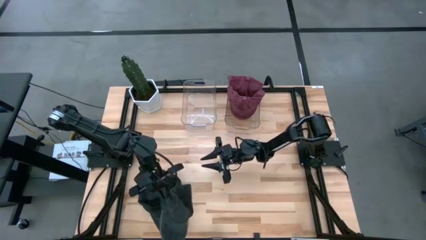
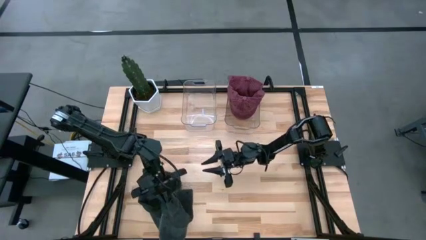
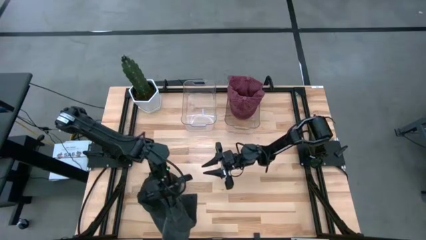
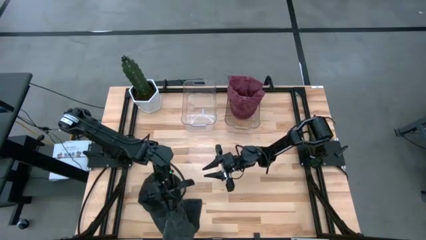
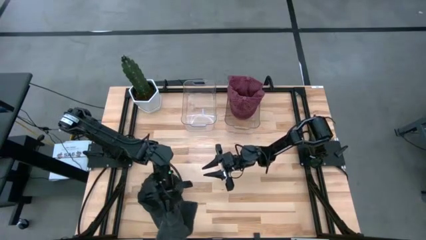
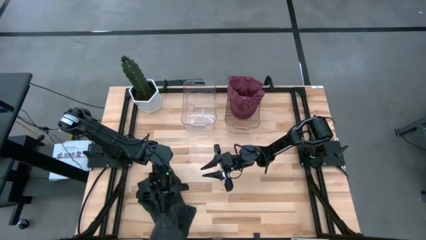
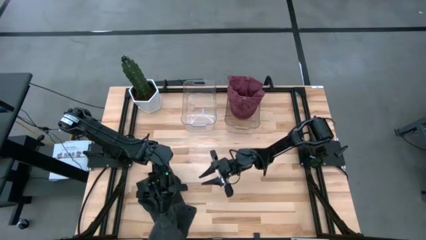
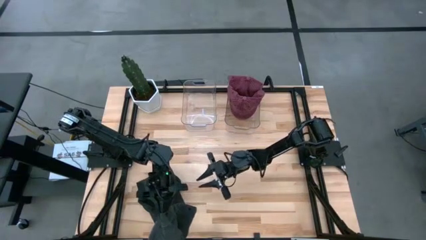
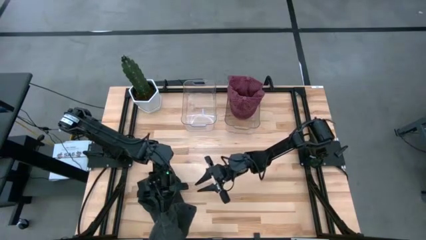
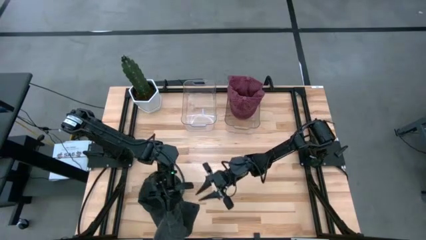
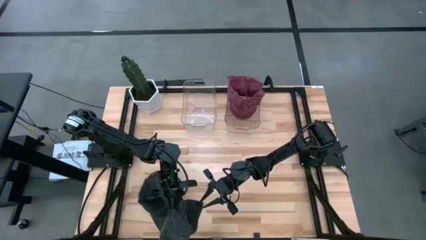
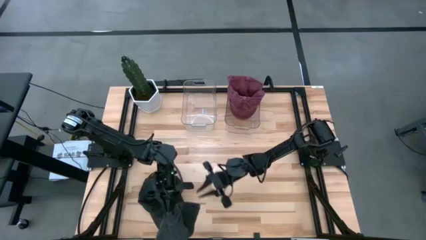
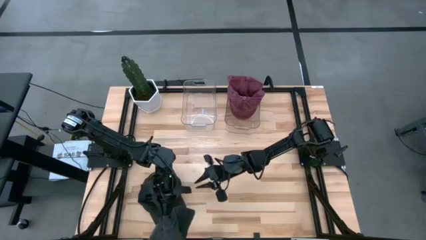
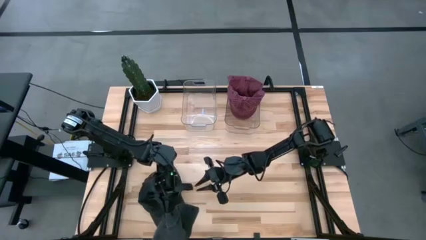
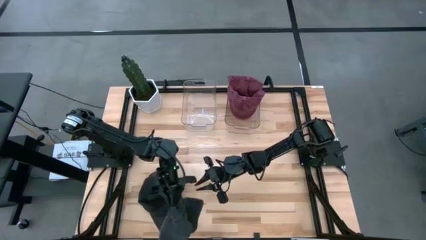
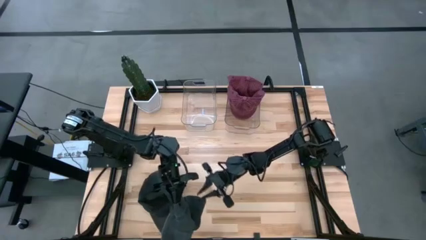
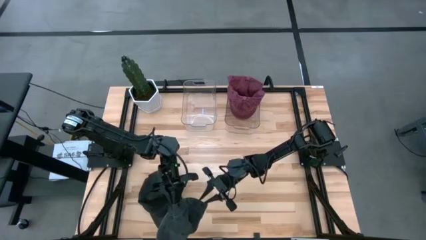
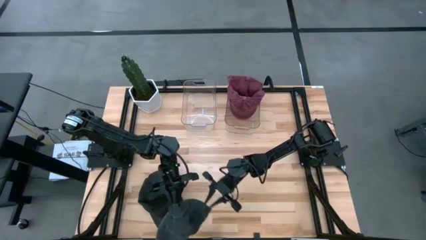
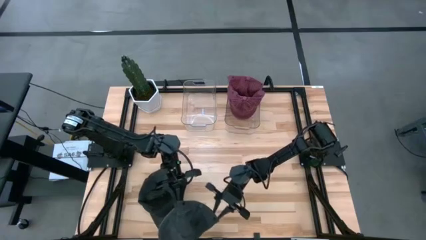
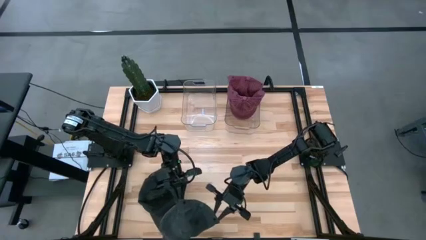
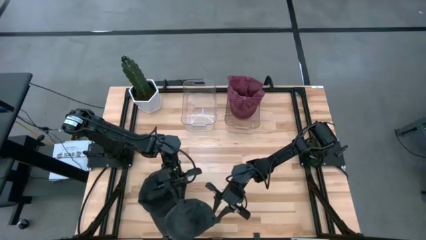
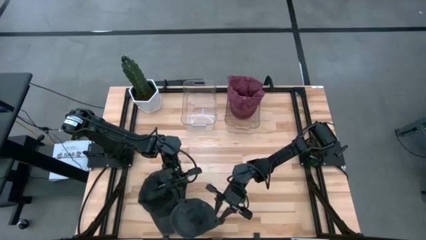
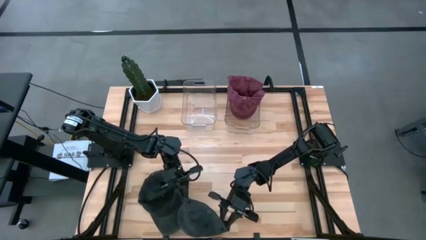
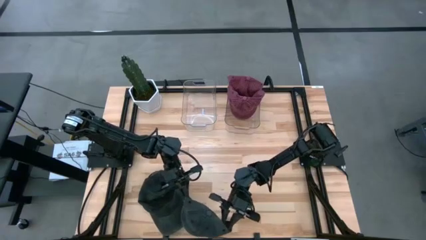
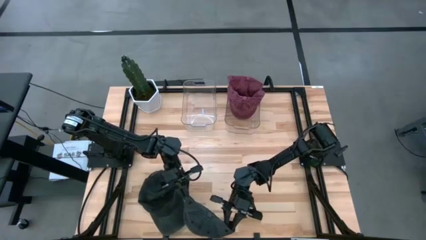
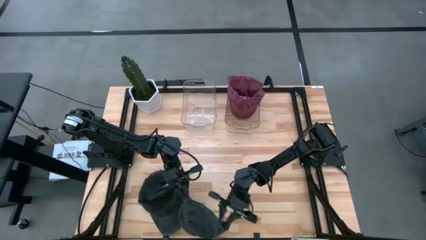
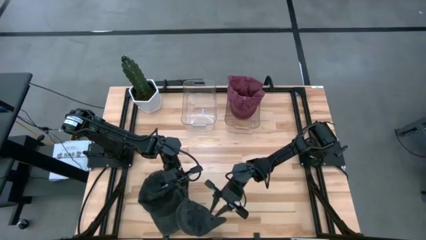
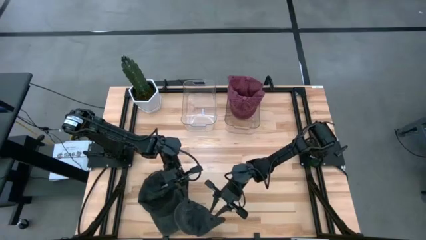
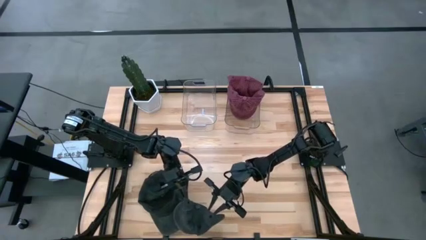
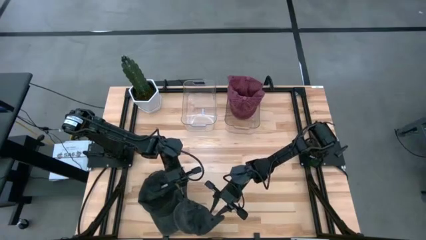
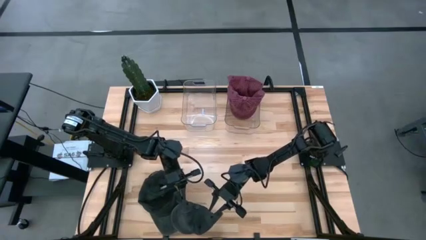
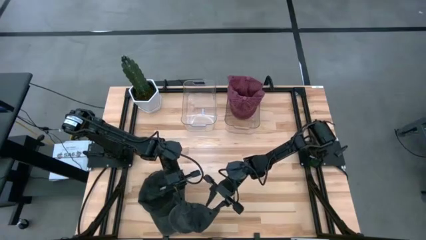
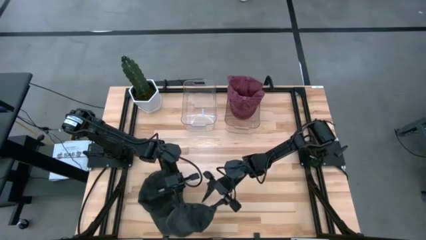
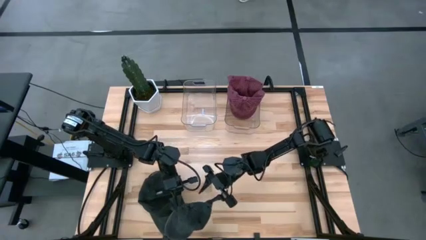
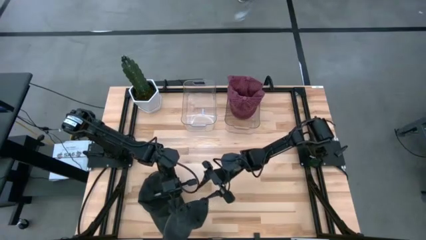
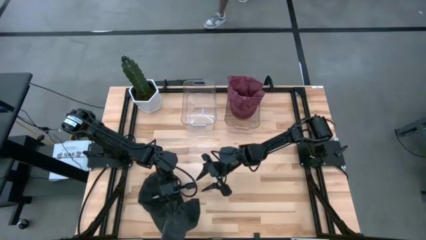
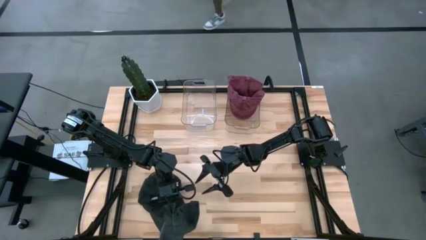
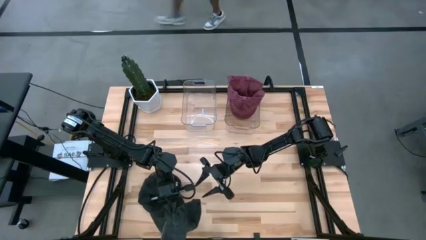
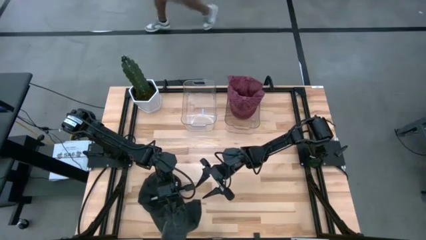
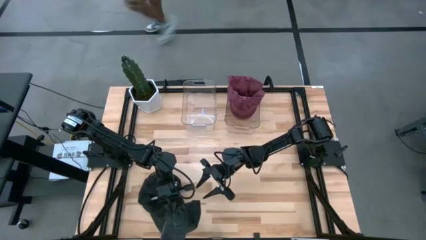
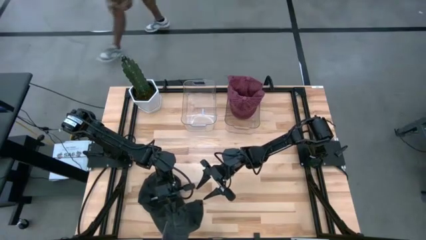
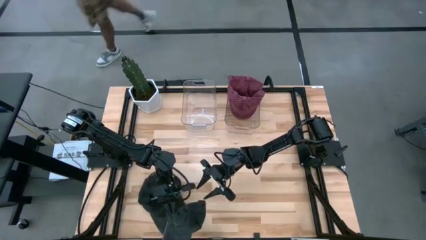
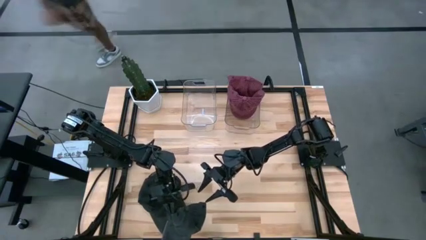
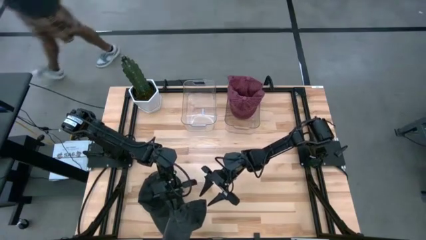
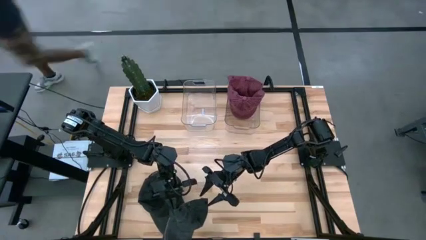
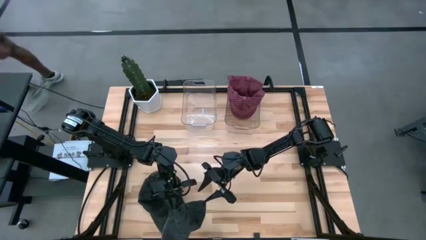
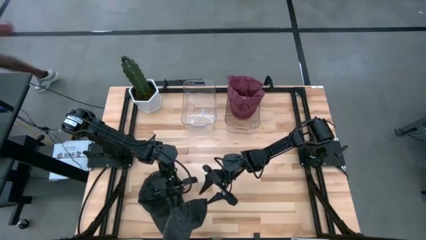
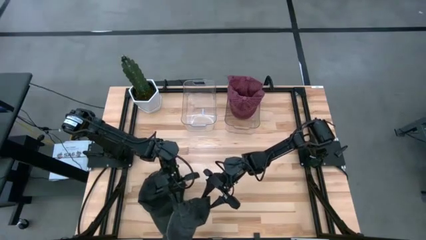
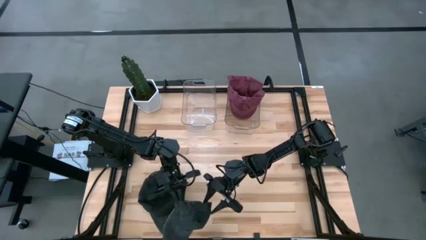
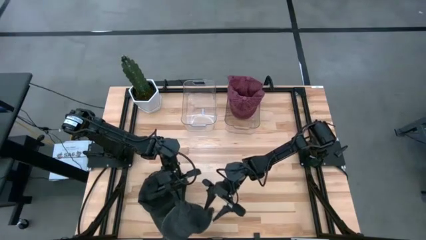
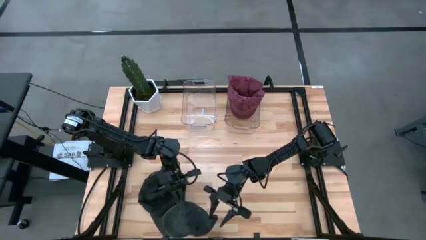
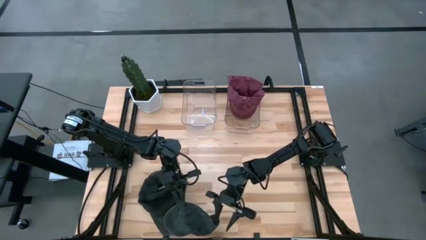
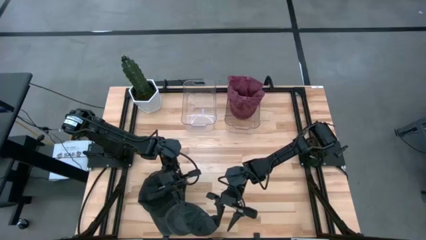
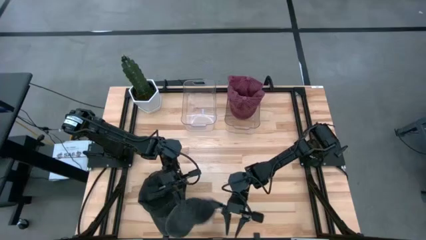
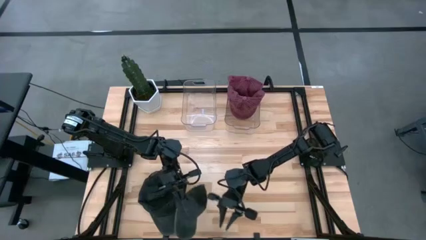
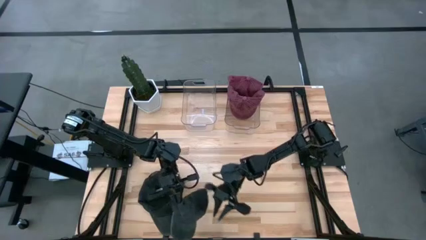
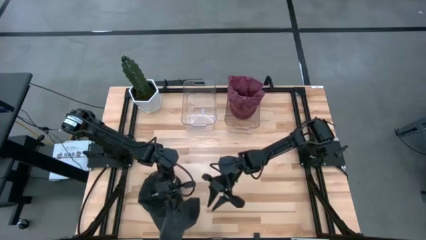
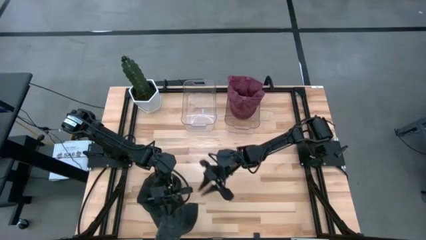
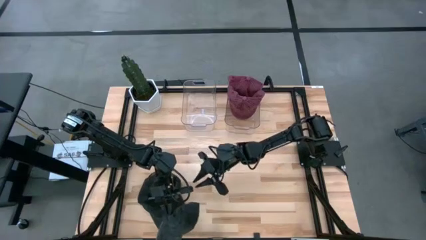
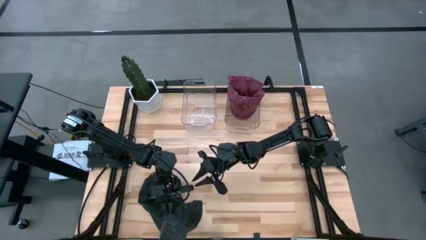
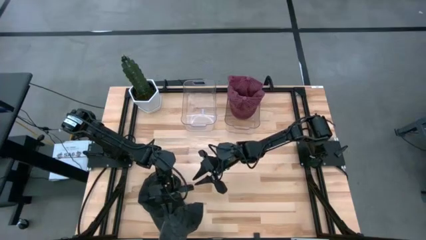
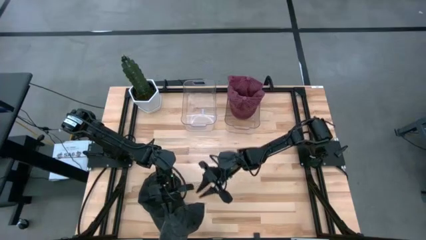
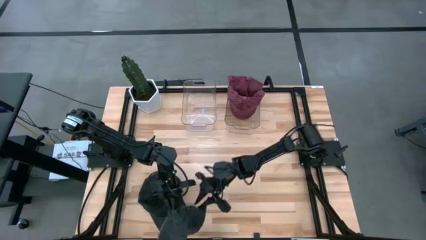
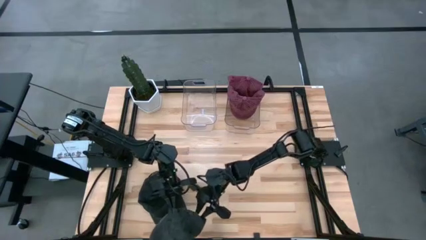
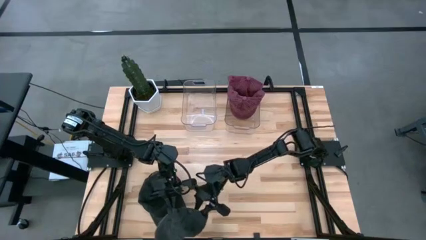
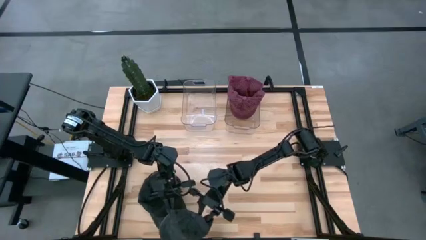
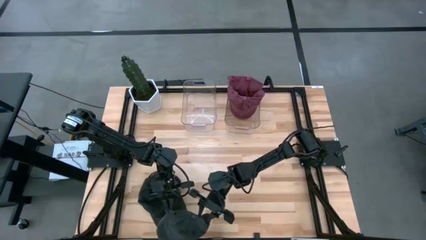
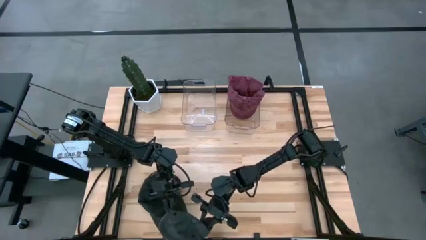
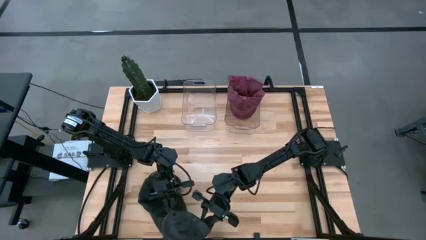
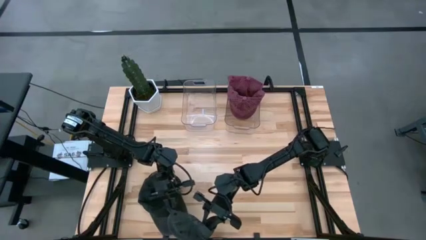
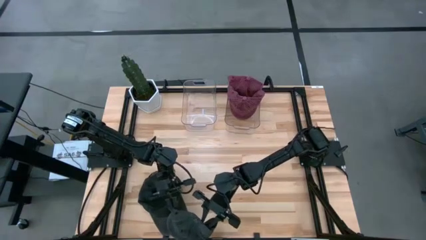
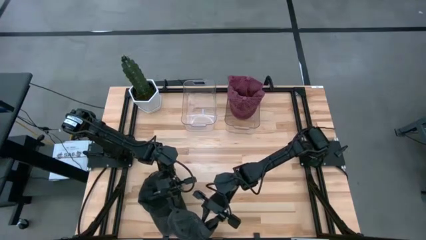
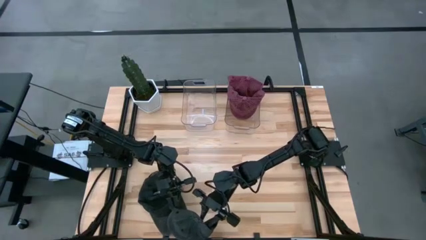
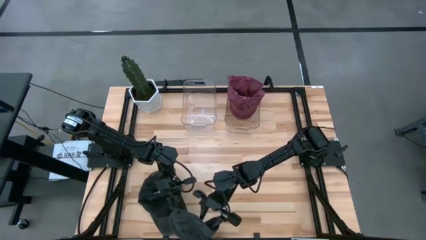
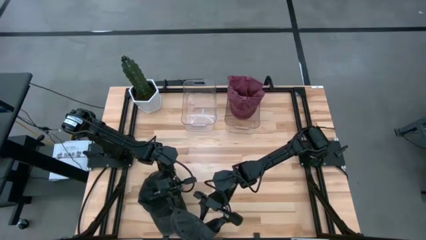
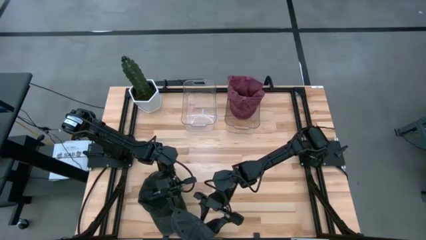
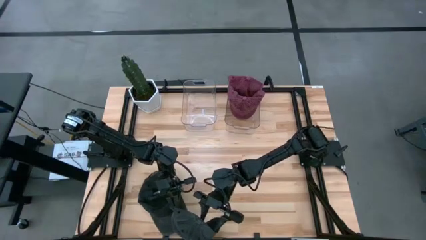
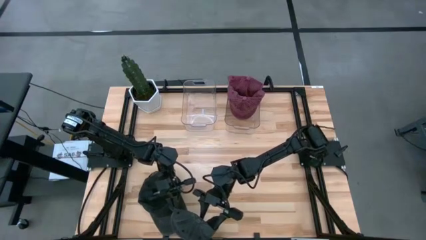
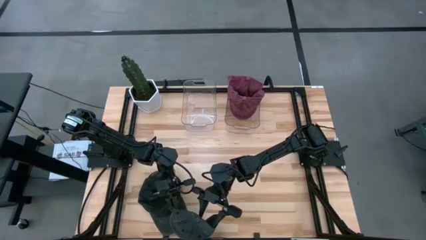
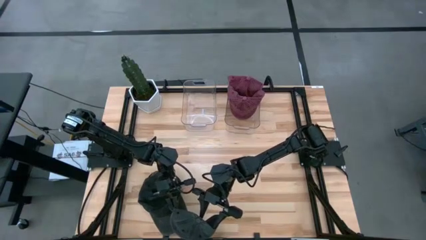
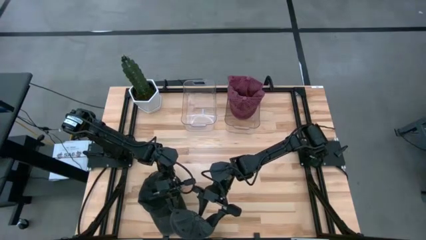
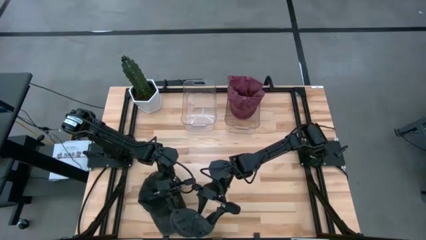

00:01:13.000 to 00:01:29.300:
Task: Pick & Place hat
Put the right black head cap into the left transparent bin
